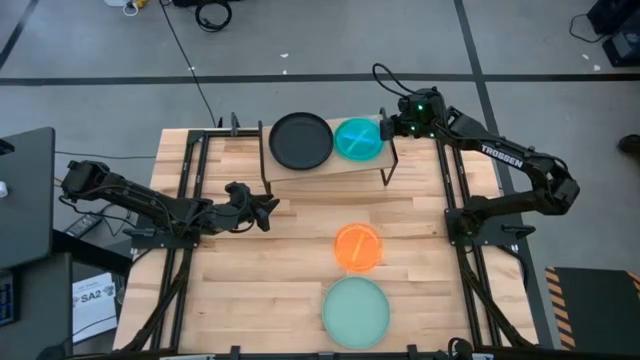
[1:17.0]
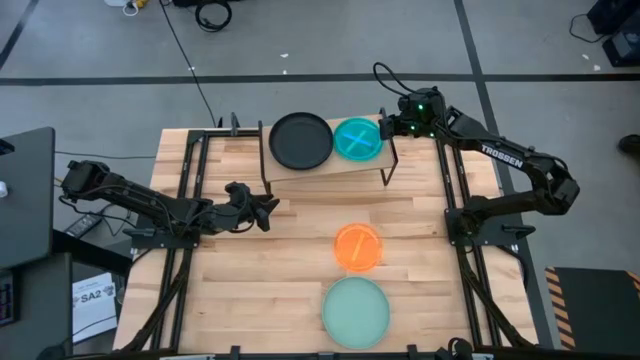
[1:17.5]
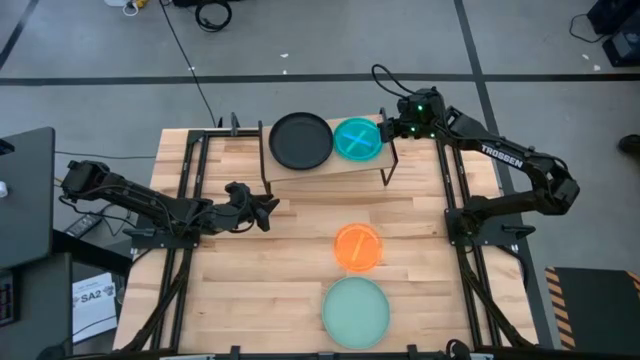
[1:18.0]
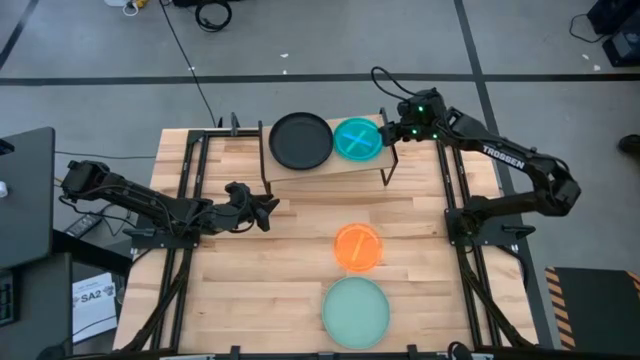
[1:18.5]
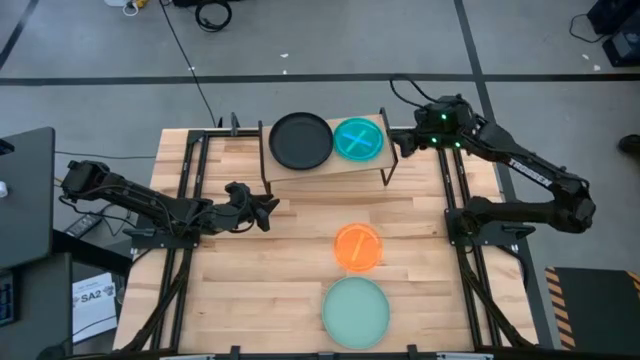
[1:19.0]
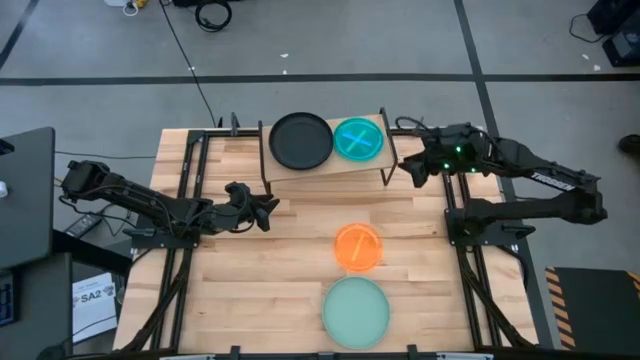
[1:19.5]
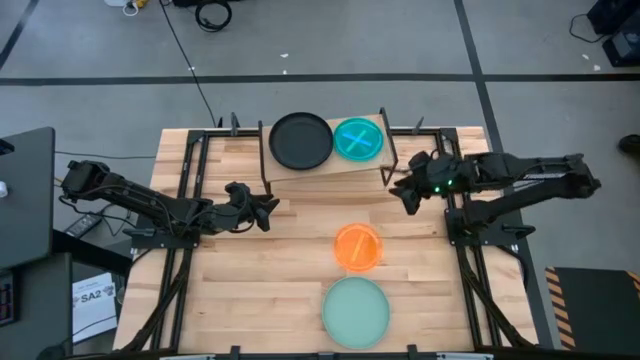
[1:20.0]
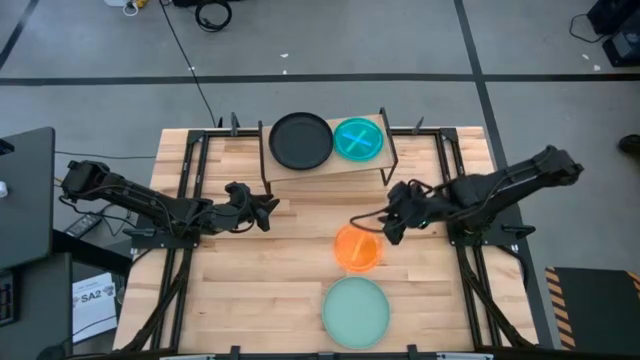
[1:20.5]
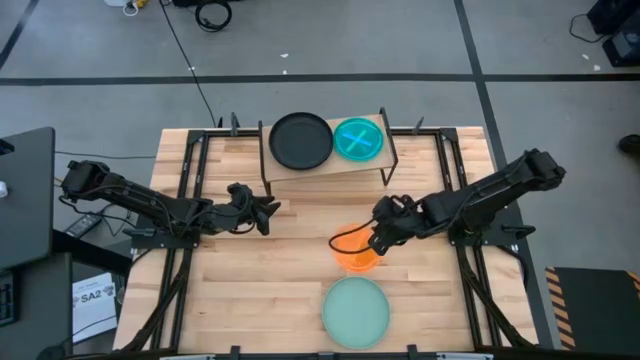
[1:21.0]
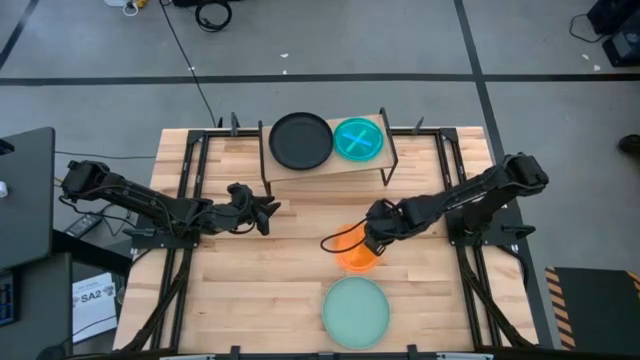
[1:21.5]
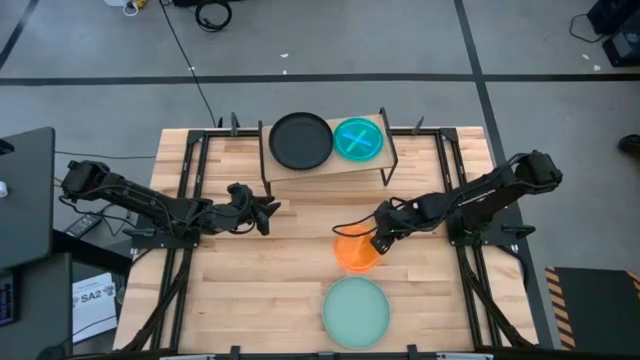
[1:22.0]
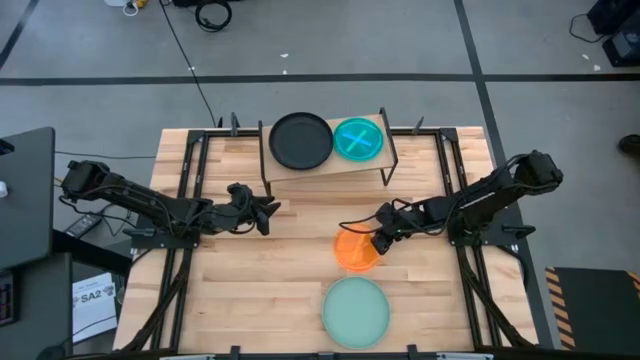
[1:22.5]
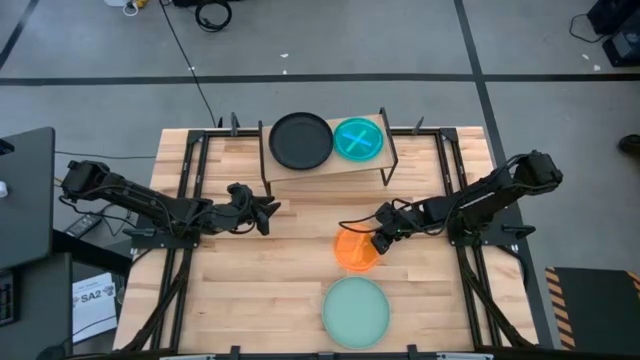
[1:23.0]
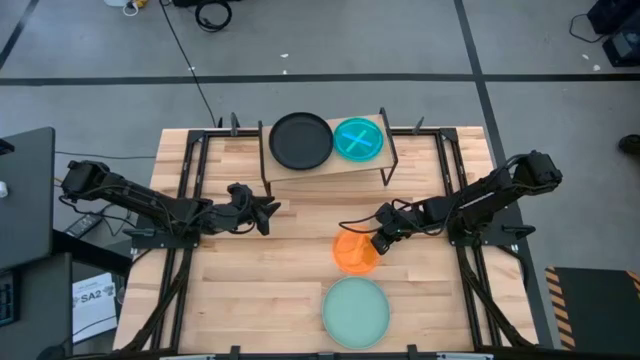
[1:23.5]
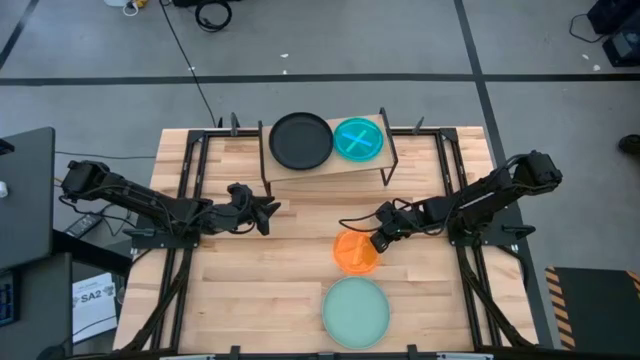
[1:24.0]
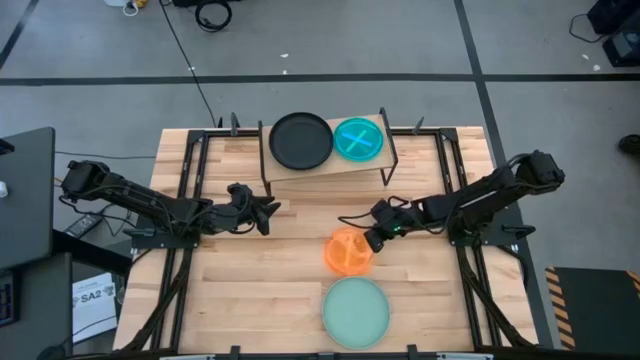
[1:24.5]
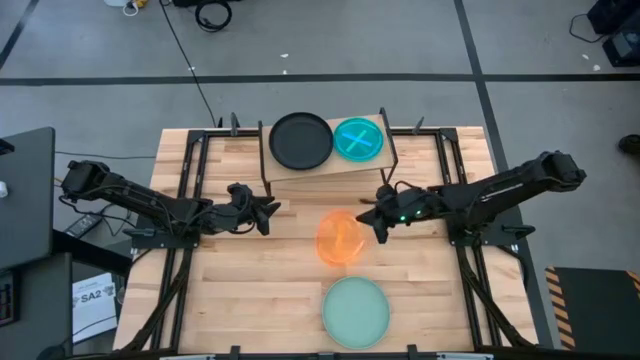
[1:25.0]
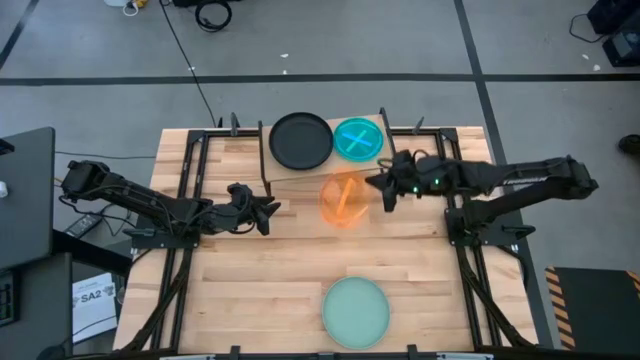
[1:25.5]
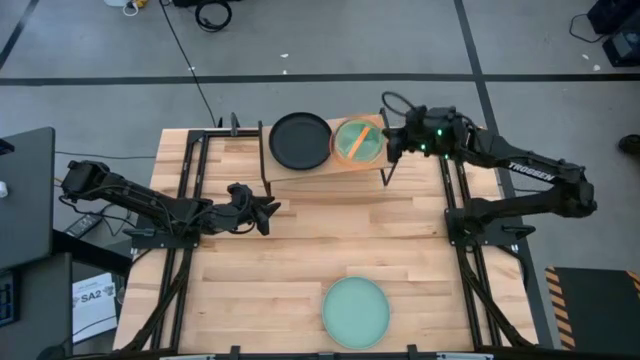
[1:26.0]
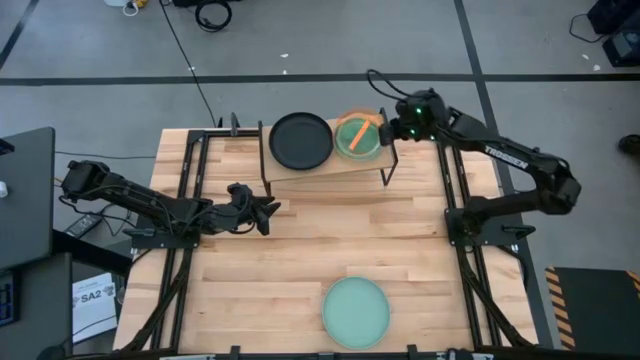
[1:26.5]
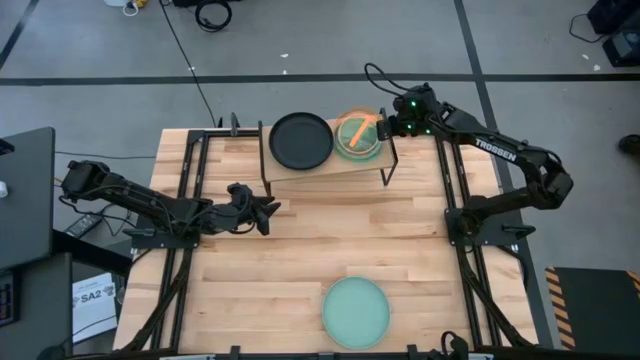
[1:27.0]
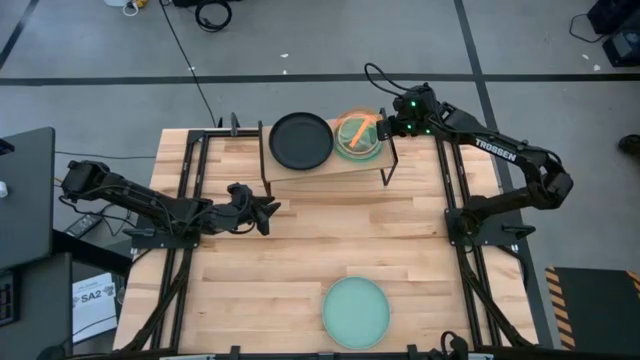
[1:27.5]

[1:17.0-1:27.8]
Task: Place and stack plates onto a shelf
Stack the orange plate on top of the light blue plate on the shelf

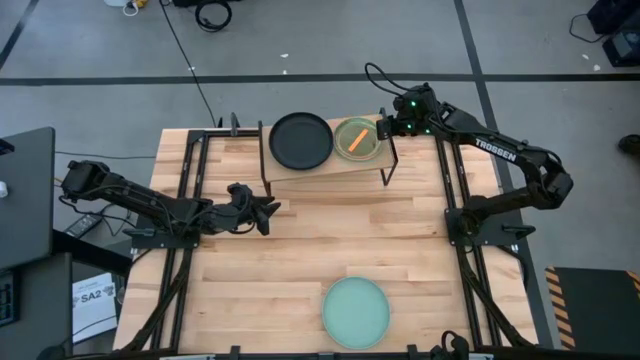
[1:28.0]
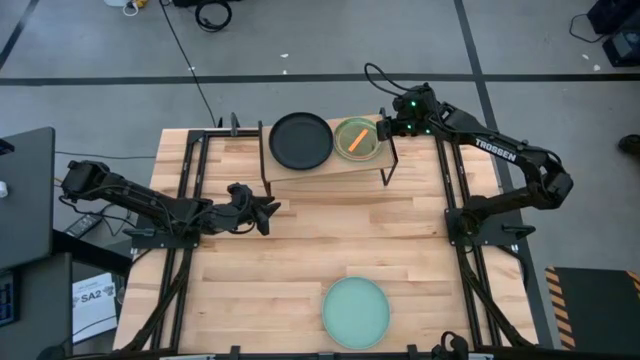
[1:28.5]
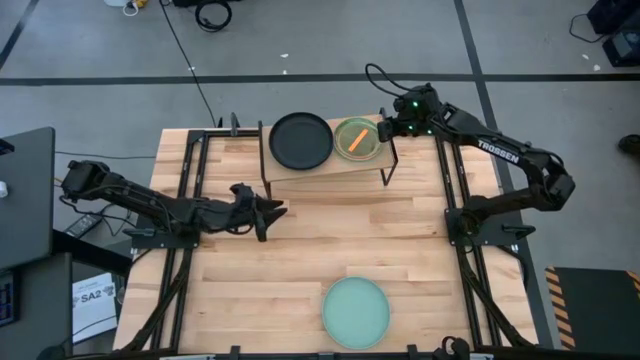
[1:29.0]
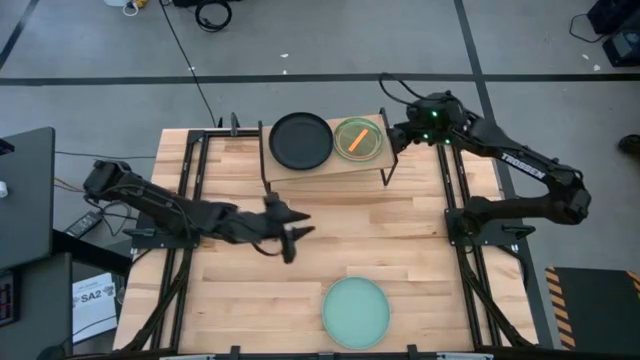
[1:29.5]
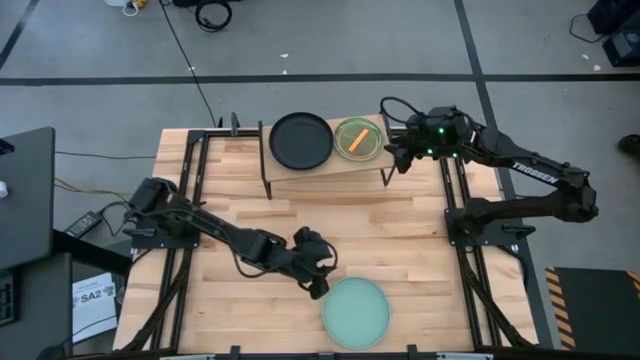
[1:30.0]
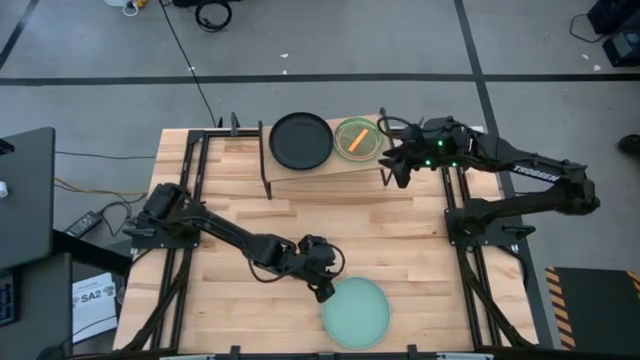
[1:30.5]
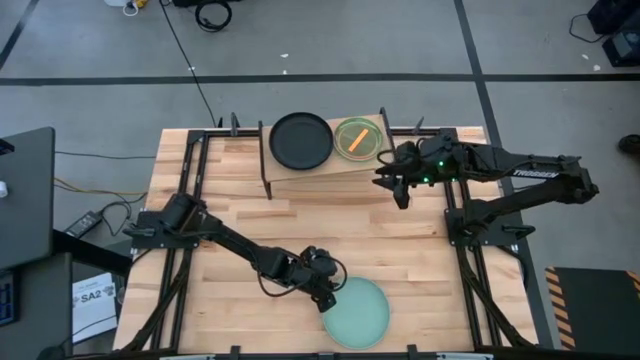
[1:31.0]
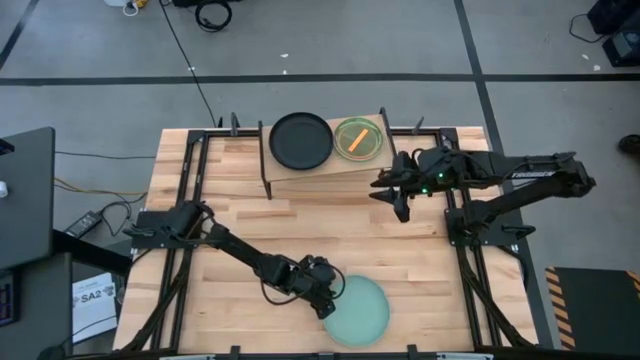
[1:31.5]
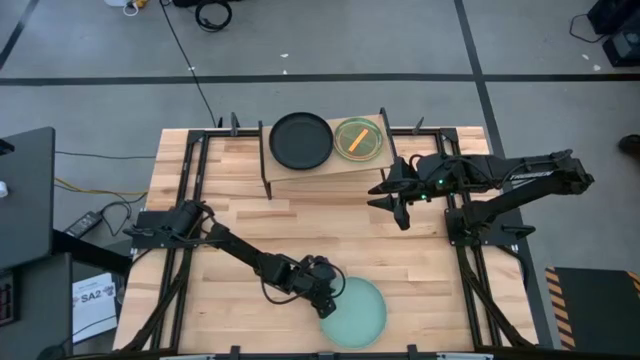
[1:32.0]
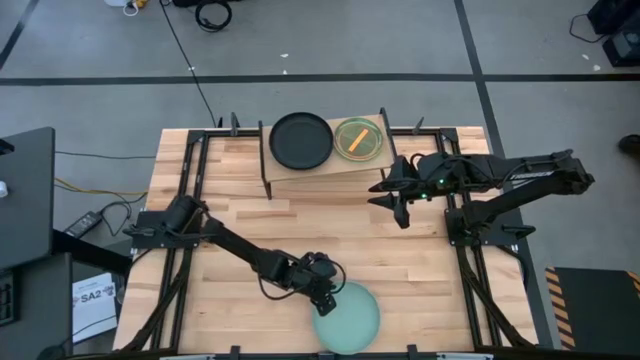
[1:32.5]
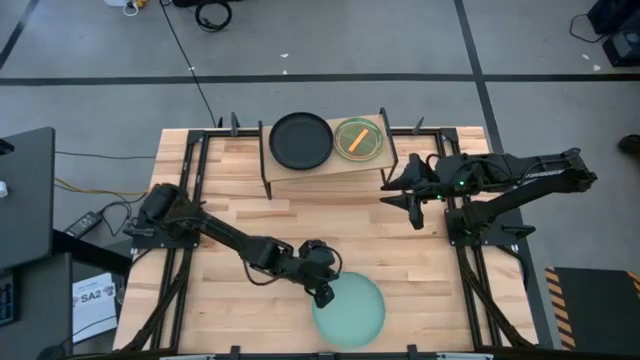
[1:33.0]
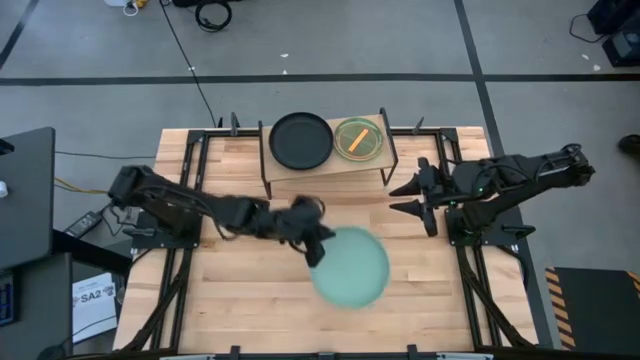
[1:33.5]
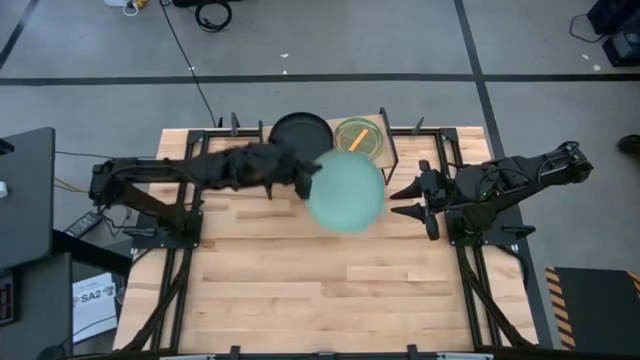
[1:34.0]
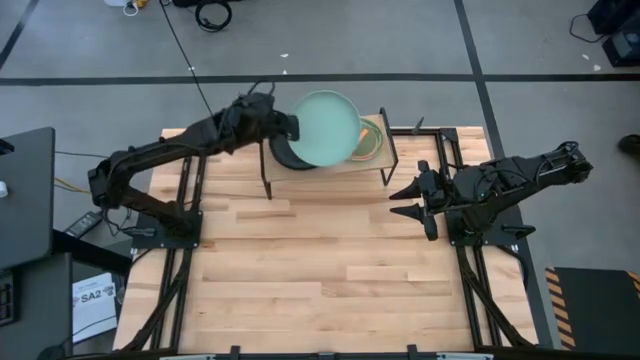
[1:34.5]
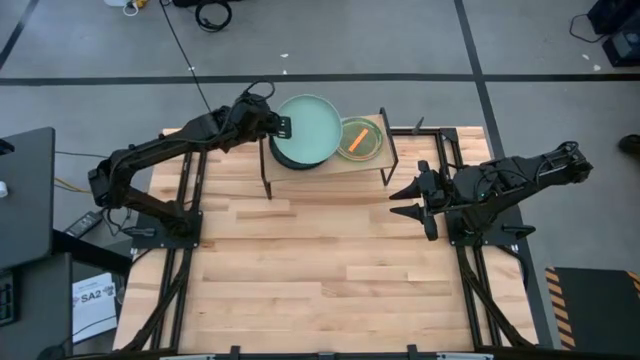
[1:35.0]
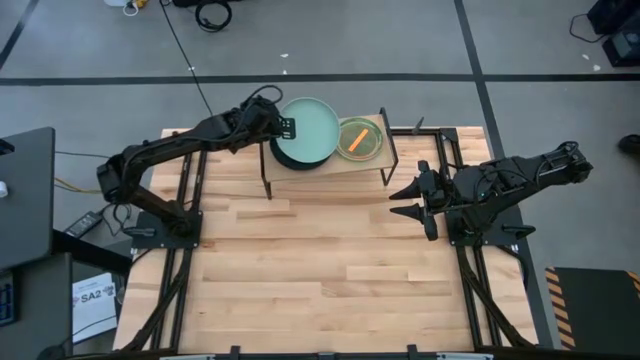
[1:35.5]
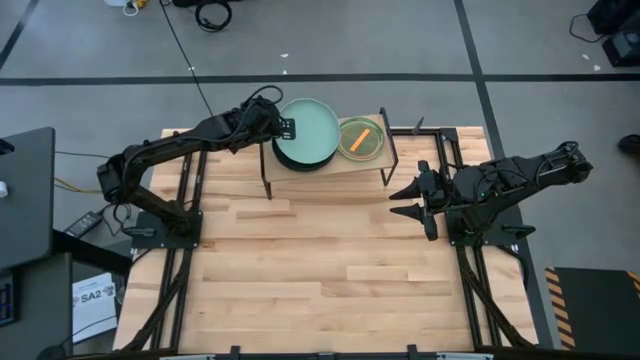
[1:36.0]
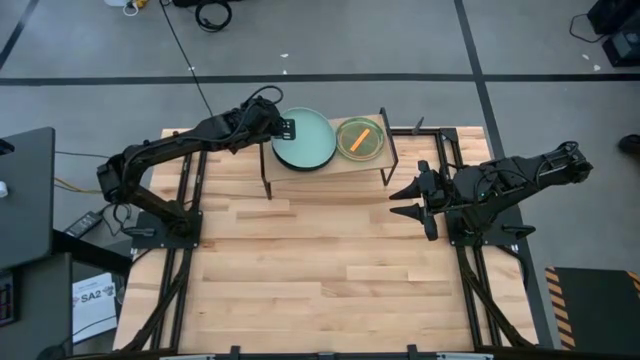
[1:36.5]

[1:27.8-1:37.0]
Stack the blue plate on top of the black plate on the shelf
